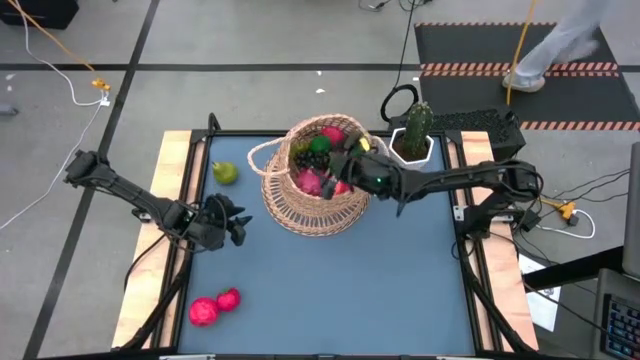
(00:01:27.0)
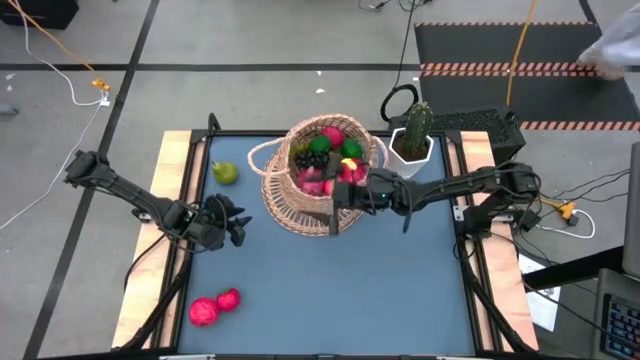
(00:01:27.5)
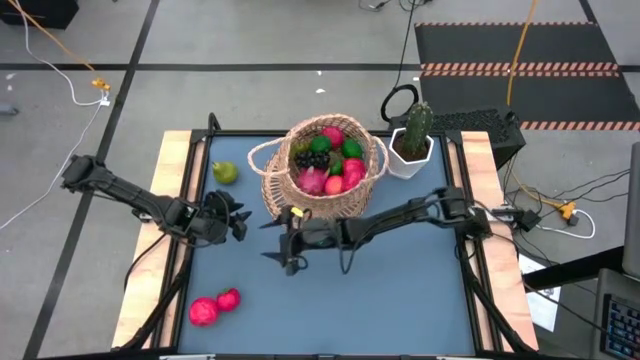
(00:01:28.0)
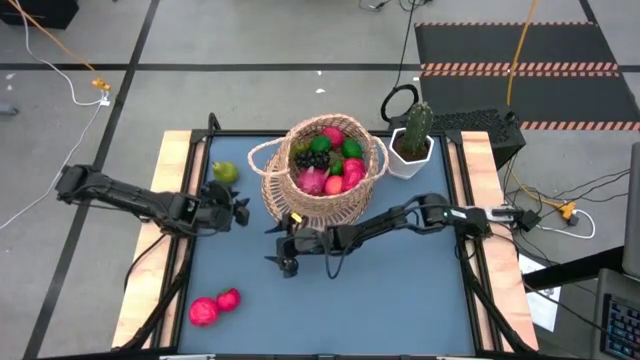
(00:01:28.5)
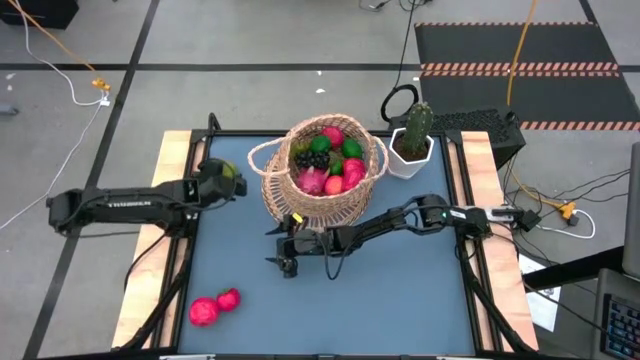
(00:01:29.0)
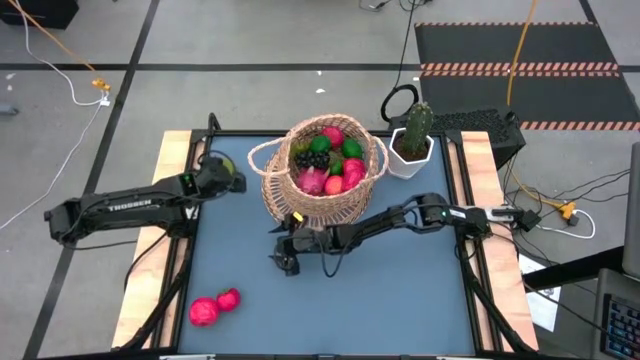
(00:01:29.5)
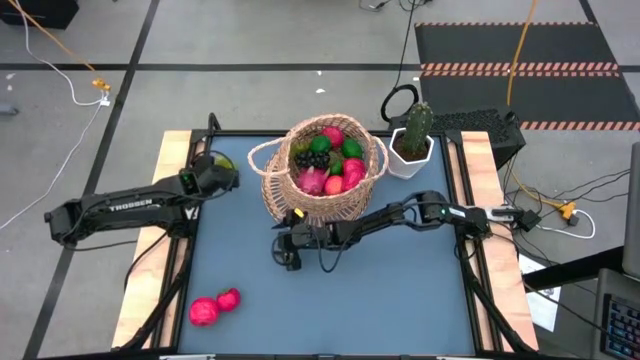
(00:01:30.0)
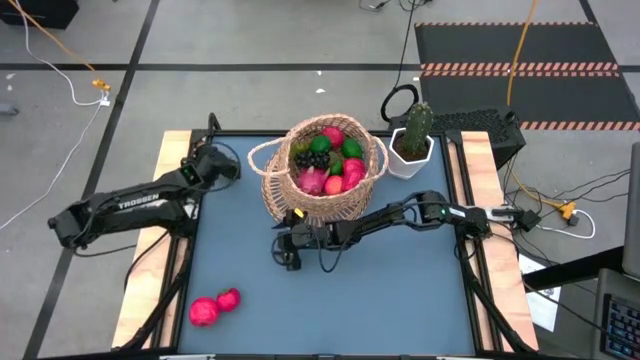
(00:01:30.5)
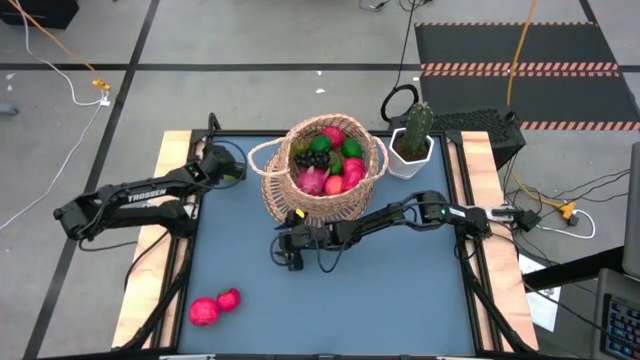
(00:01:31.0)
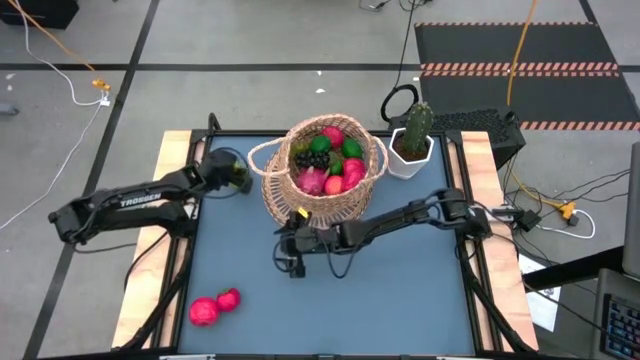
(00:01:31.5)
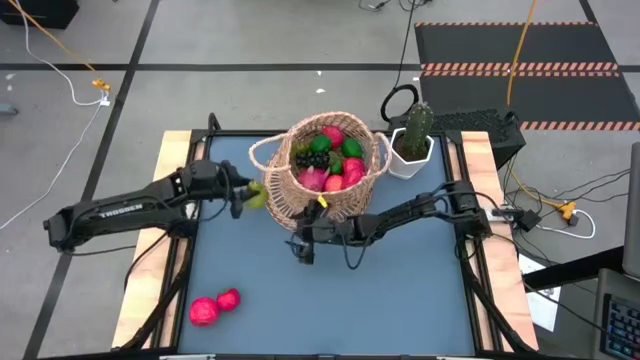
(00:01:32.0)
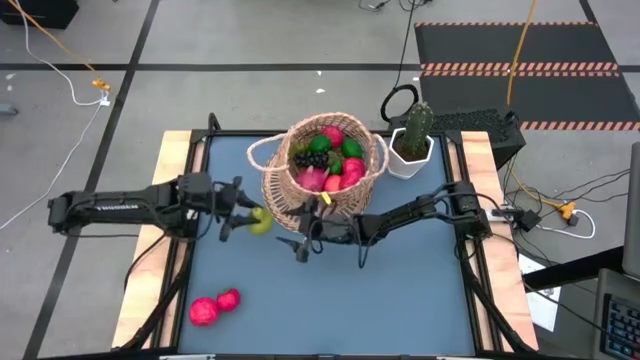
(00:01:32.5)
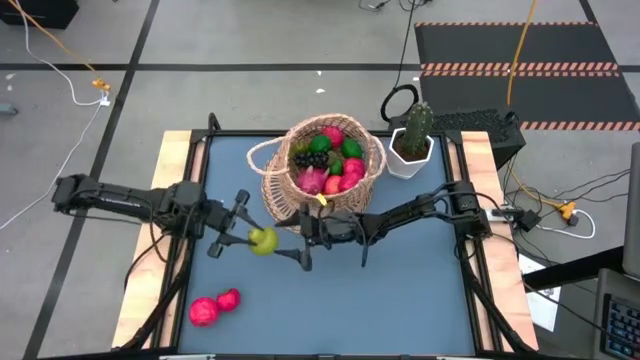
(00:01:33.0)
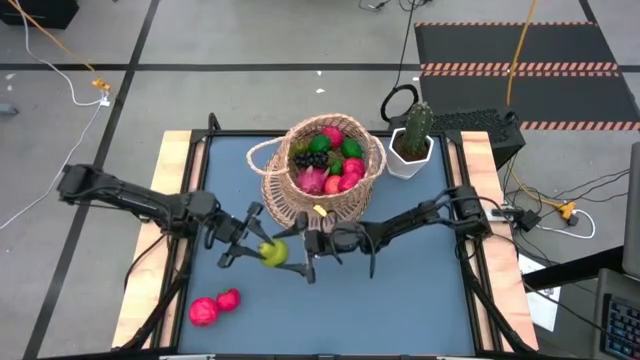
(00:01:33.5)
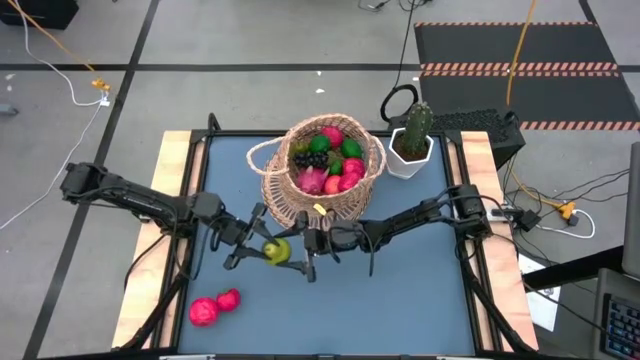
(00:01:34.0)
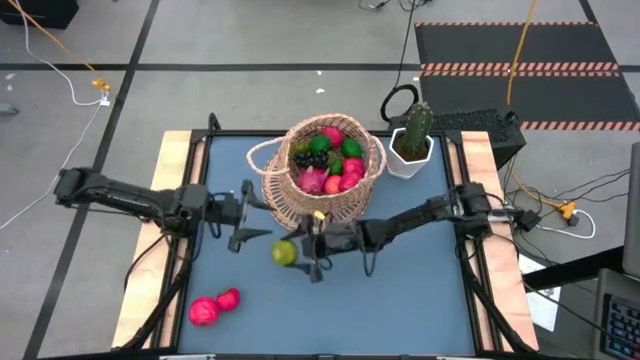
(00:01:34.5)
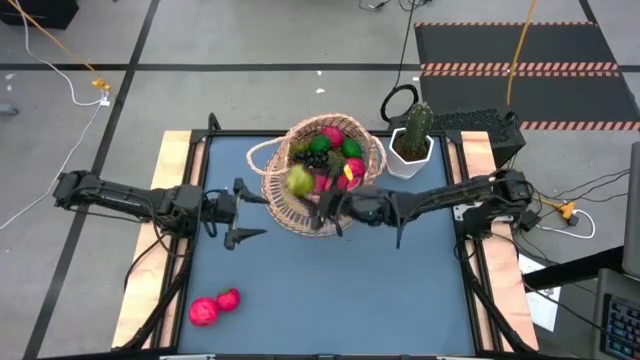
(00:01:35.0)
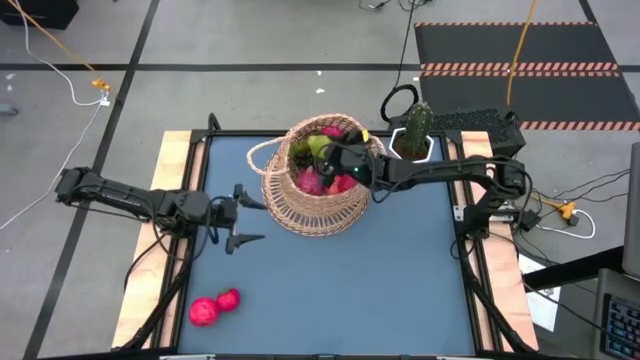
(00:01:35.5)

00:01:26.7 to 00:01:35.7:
Task: Build produce basket
Put the pear into the basket

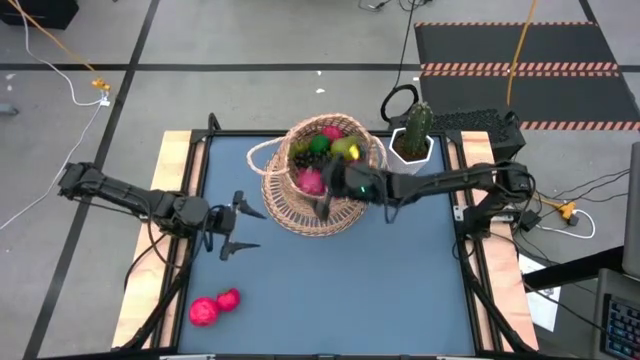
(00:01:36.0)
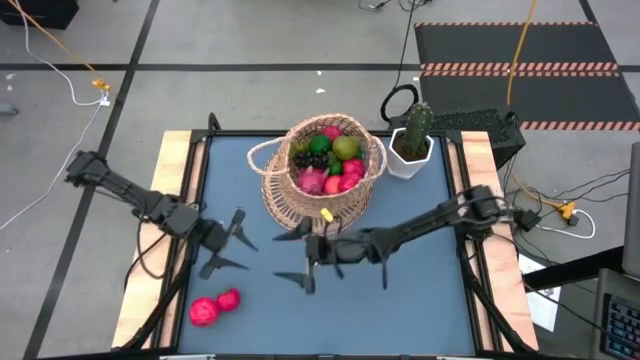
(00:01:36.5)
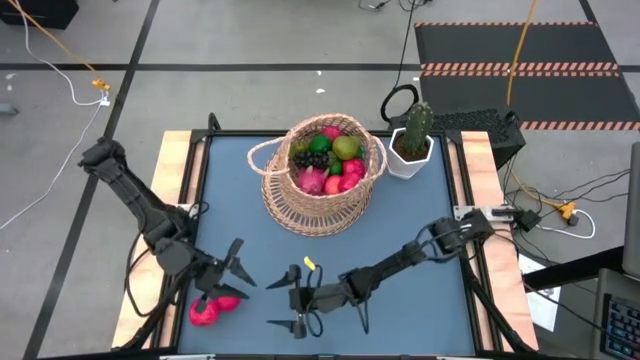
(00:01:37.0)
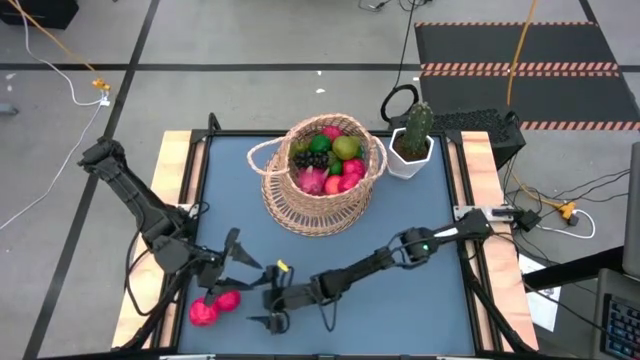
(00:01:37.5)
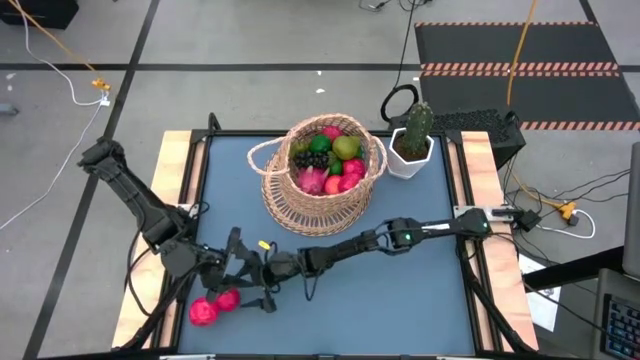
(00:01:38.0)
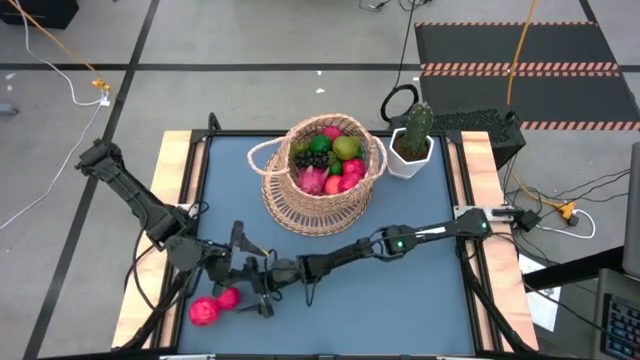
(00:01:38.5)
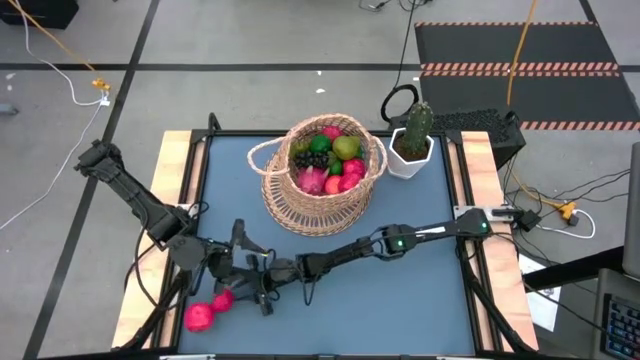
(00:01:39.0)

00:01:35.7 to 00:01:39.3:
Put the tomato into the basket

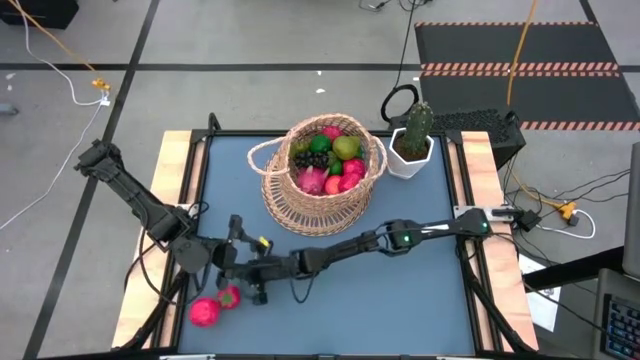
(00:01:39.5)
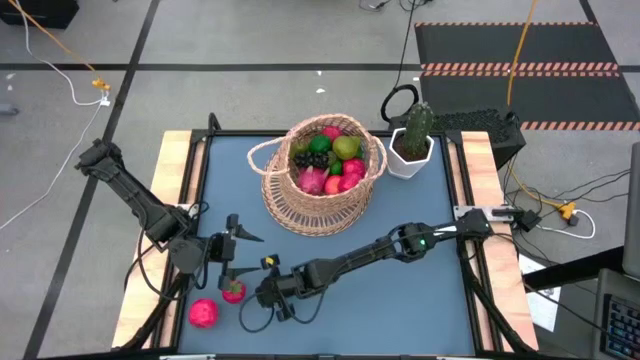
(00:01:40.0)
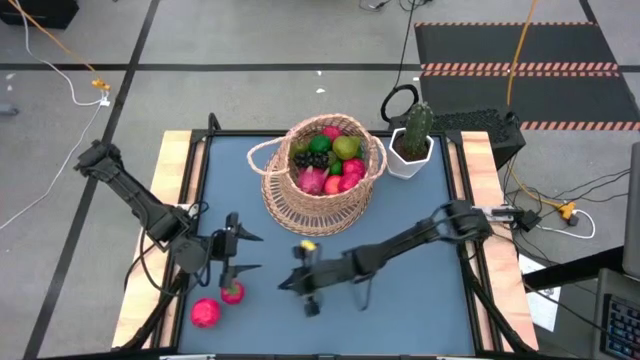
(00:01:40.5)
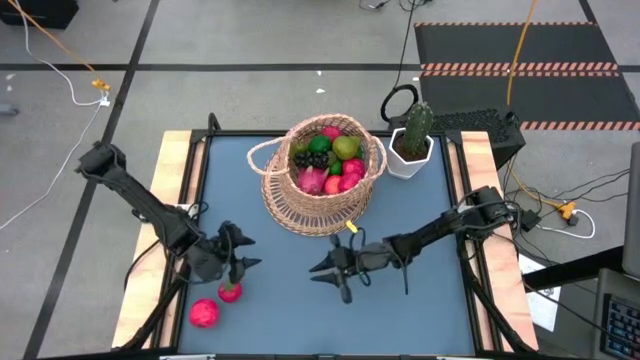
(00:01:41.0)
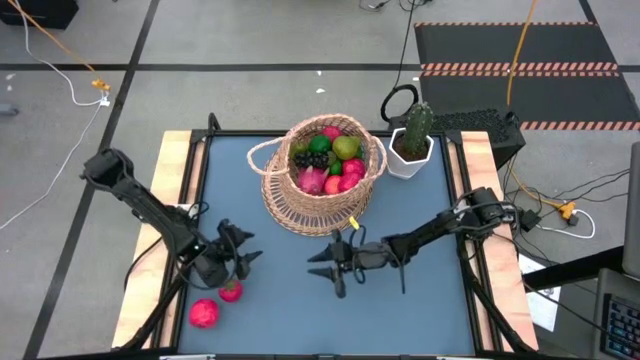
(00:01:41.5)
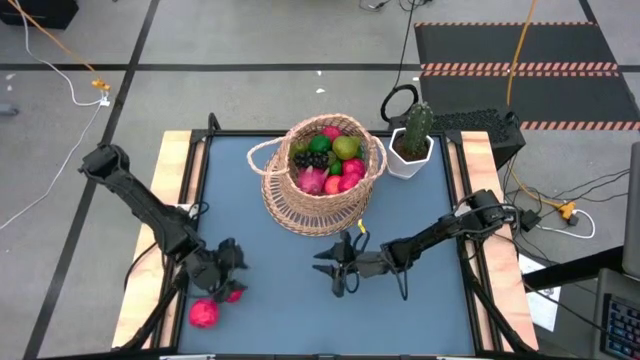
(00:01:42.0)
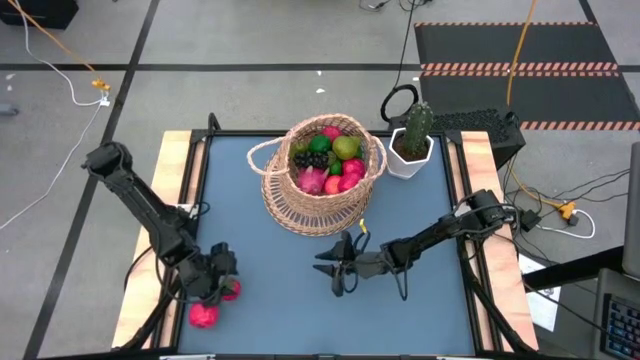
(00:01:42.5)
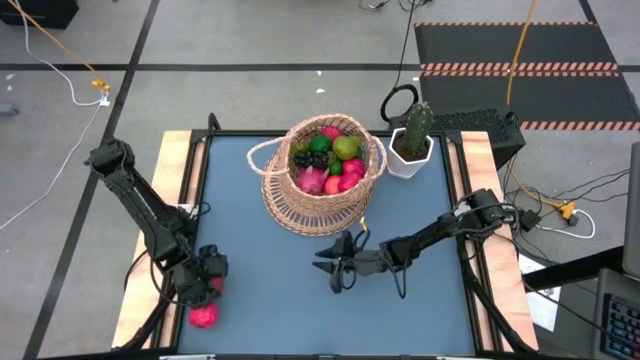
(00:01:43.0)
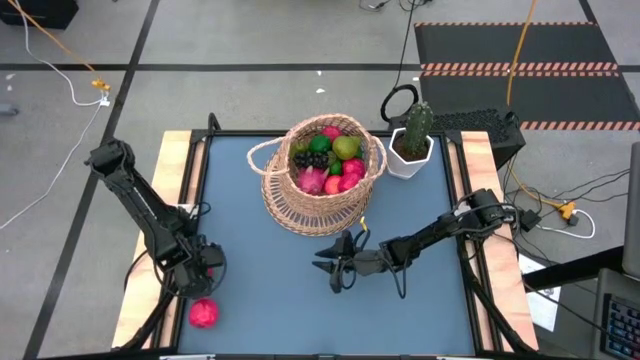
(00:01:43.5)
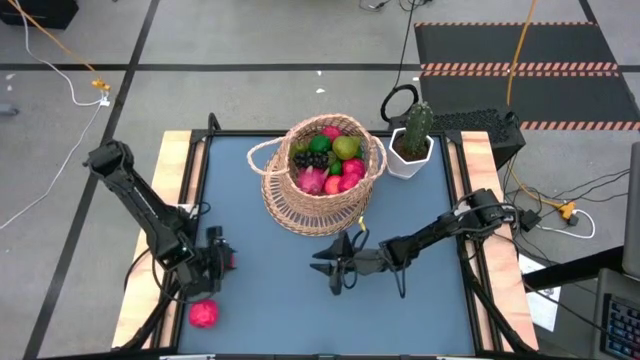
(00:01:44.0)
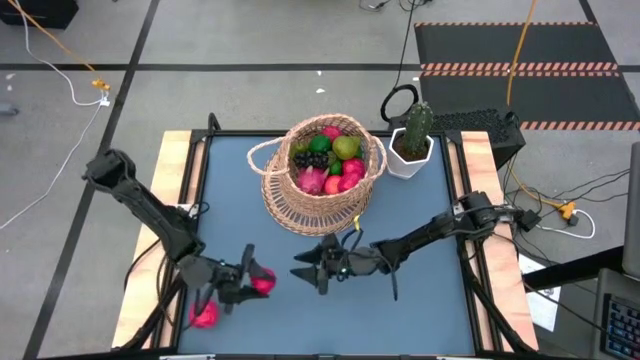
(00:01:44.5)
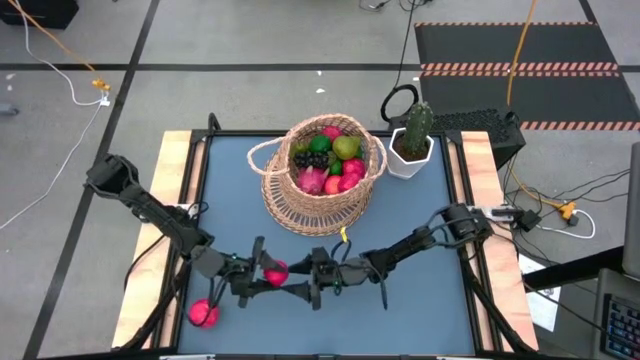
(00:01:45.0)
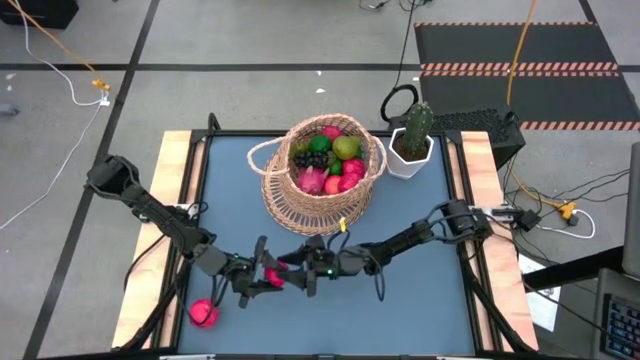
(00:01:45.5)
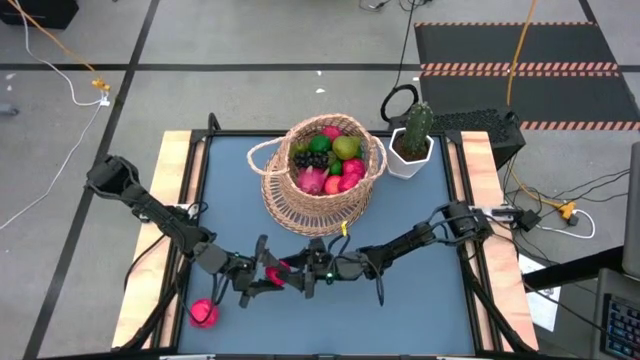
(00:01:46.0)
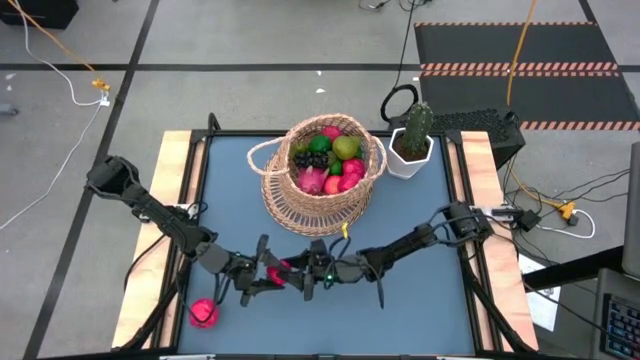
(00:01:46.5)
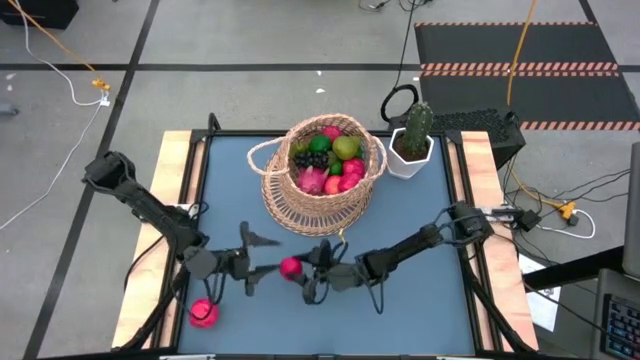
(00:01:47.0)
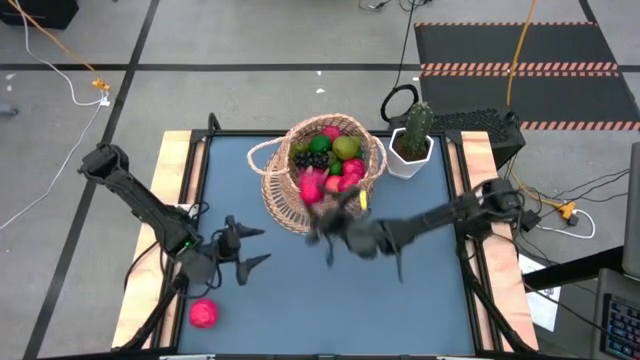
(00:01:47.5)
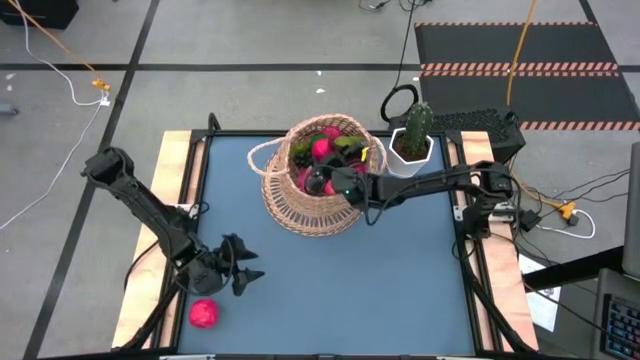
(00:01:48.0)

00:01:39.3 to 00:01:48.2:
Put the tomato into the basket
